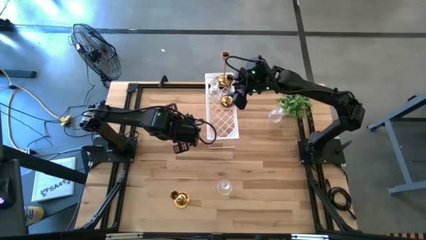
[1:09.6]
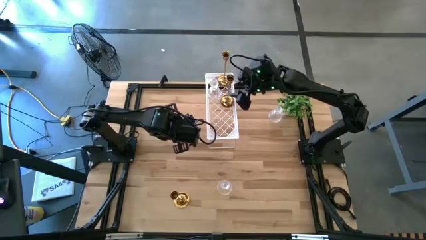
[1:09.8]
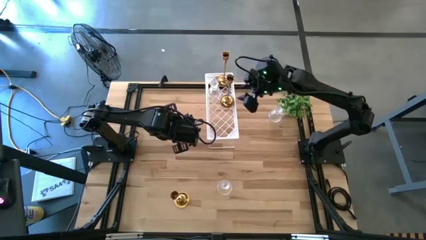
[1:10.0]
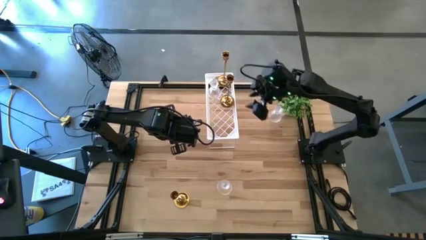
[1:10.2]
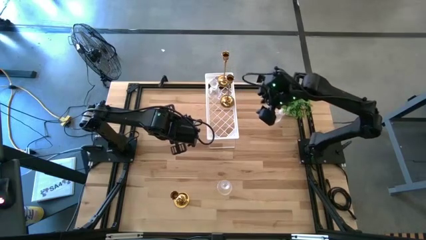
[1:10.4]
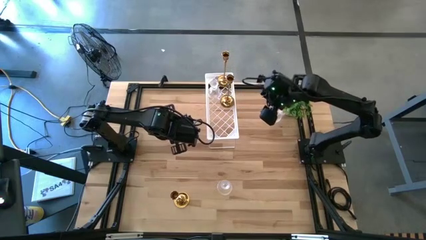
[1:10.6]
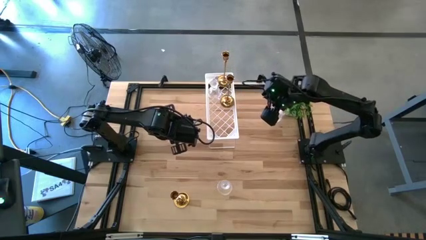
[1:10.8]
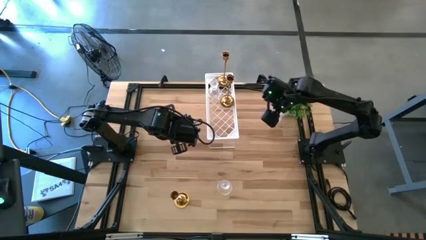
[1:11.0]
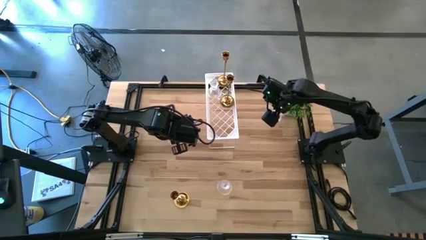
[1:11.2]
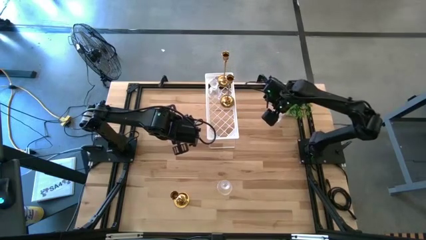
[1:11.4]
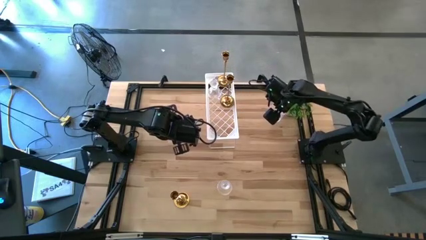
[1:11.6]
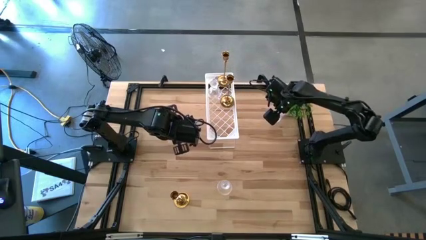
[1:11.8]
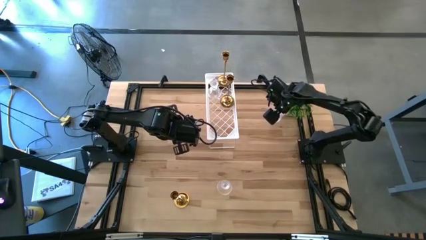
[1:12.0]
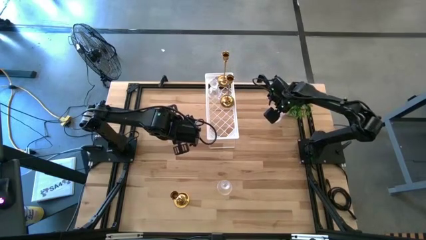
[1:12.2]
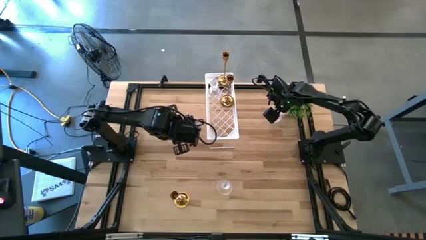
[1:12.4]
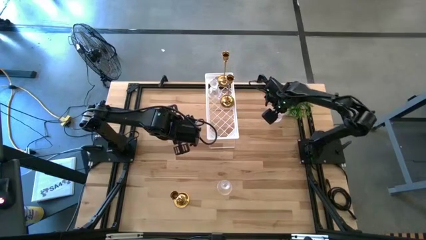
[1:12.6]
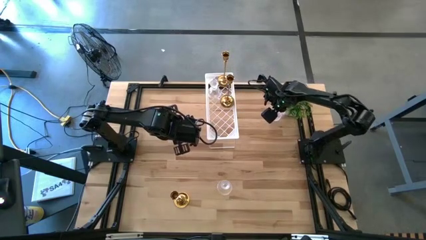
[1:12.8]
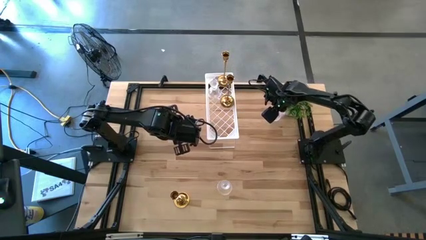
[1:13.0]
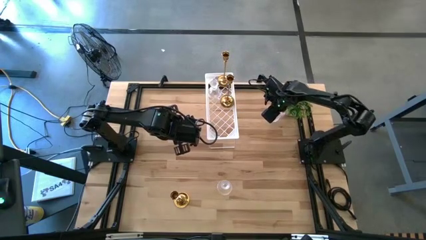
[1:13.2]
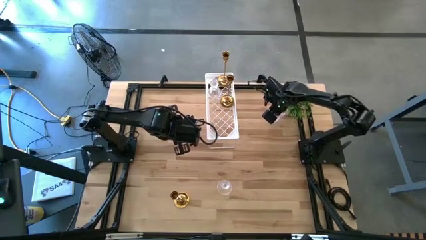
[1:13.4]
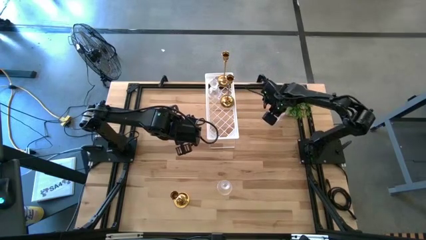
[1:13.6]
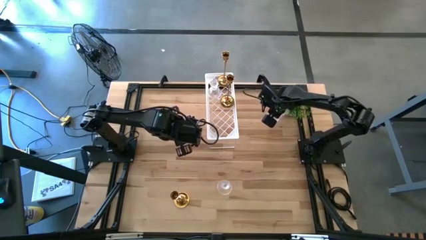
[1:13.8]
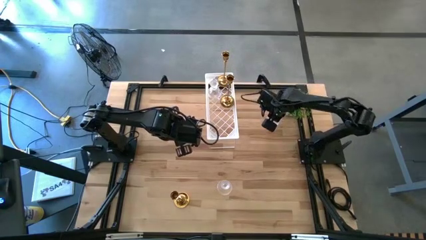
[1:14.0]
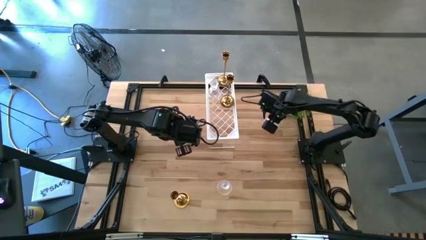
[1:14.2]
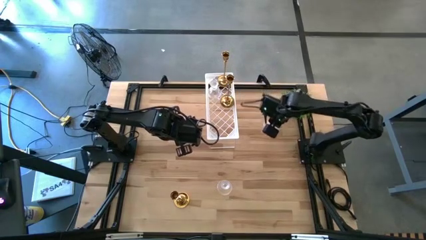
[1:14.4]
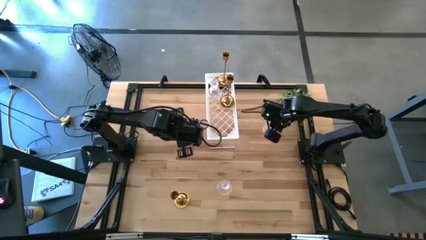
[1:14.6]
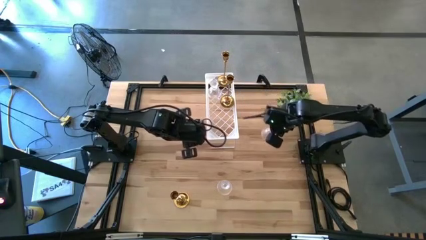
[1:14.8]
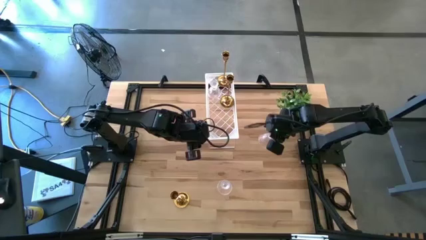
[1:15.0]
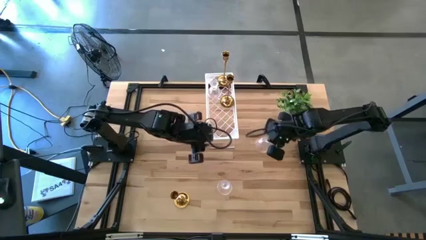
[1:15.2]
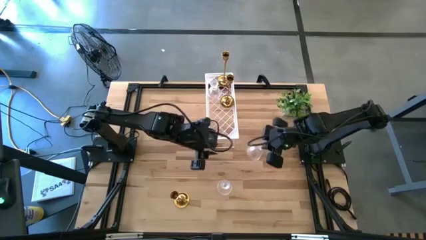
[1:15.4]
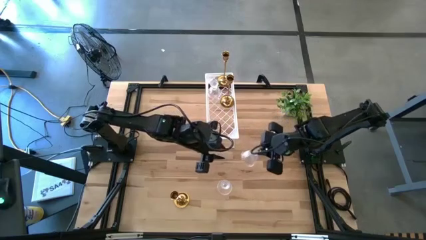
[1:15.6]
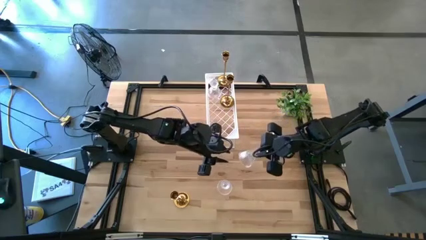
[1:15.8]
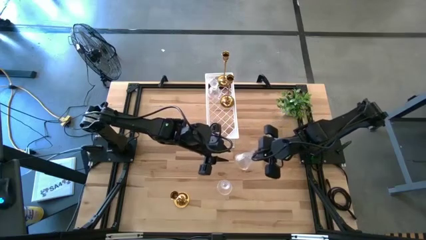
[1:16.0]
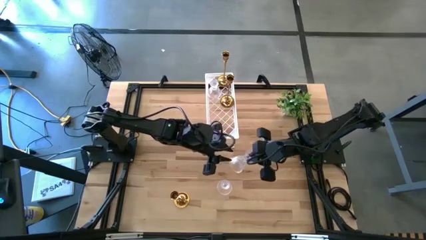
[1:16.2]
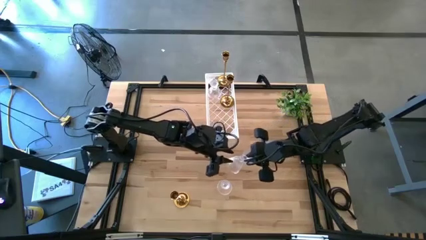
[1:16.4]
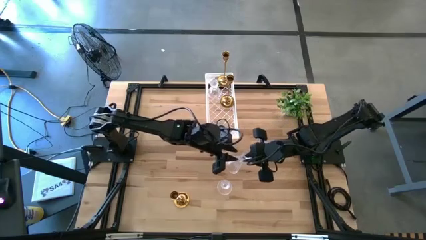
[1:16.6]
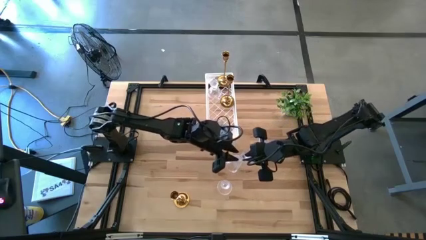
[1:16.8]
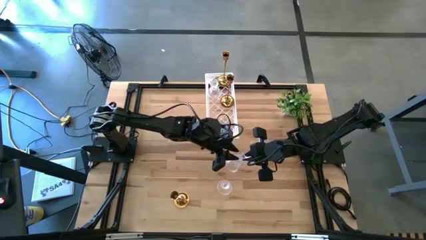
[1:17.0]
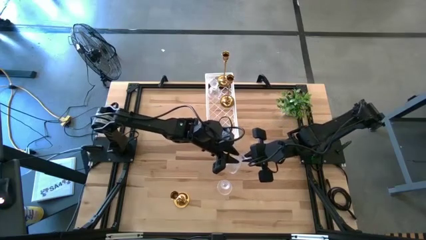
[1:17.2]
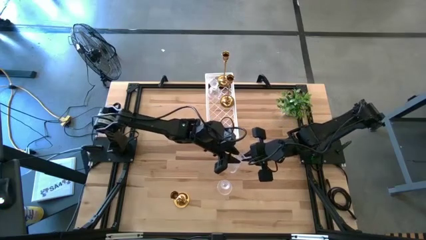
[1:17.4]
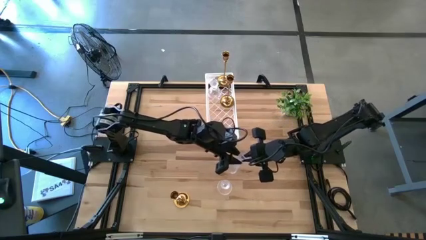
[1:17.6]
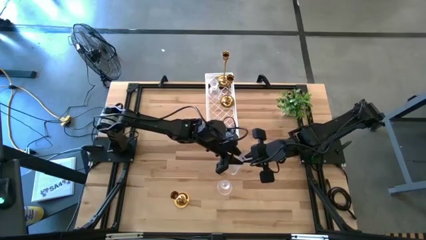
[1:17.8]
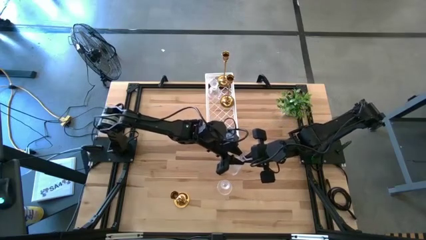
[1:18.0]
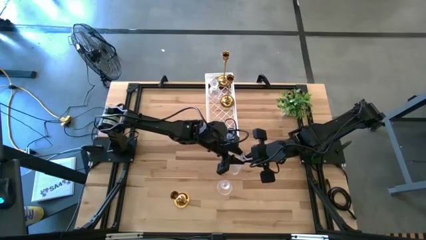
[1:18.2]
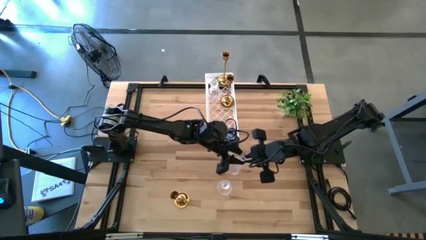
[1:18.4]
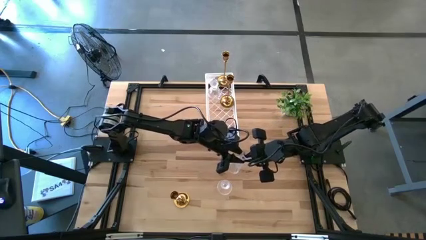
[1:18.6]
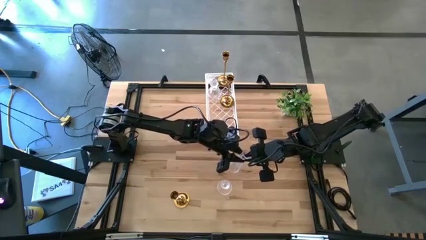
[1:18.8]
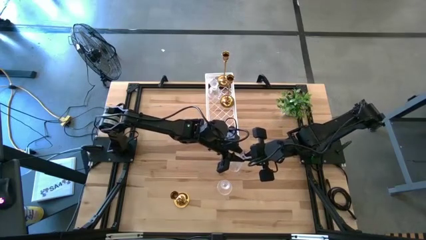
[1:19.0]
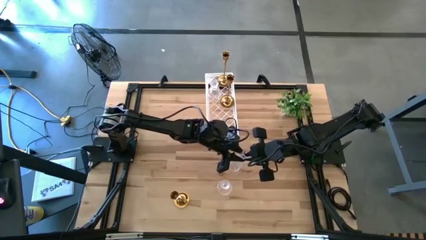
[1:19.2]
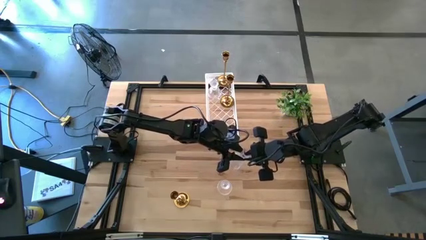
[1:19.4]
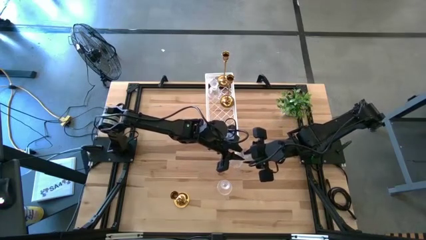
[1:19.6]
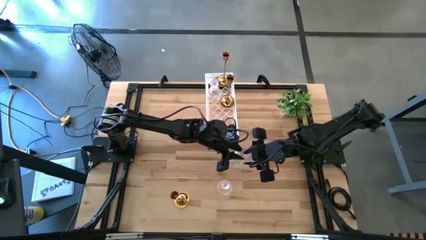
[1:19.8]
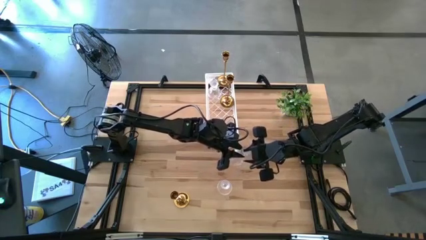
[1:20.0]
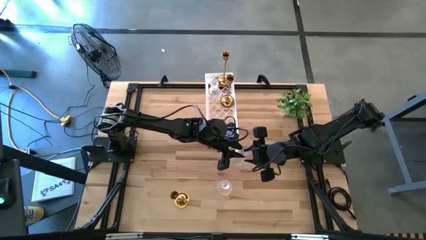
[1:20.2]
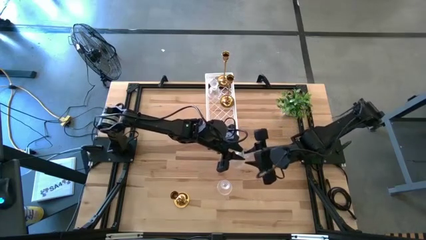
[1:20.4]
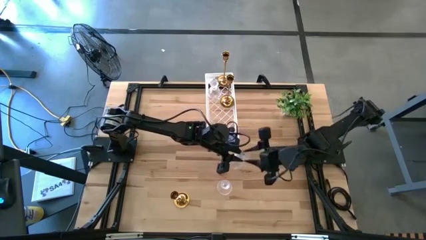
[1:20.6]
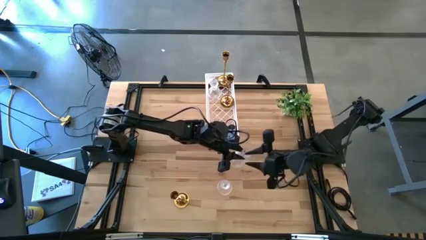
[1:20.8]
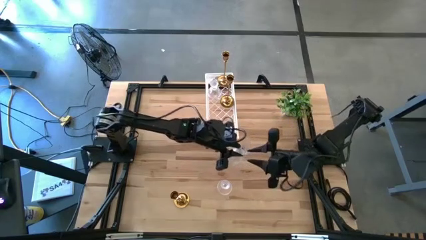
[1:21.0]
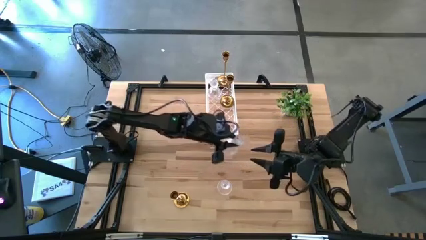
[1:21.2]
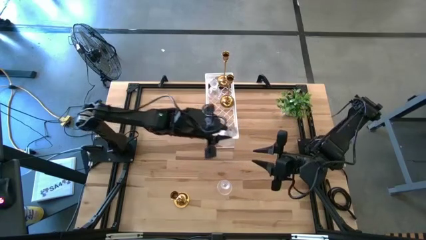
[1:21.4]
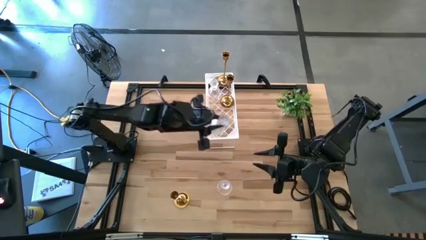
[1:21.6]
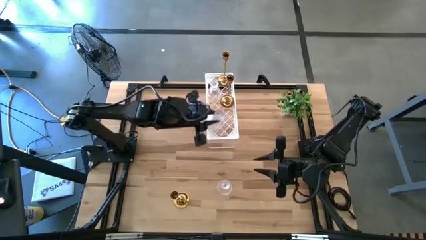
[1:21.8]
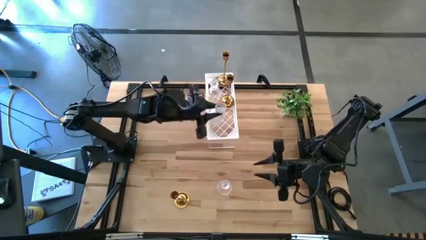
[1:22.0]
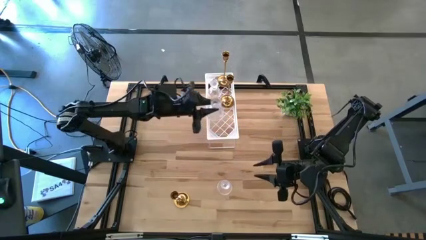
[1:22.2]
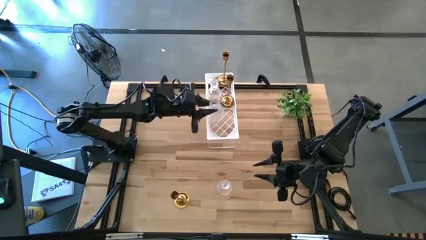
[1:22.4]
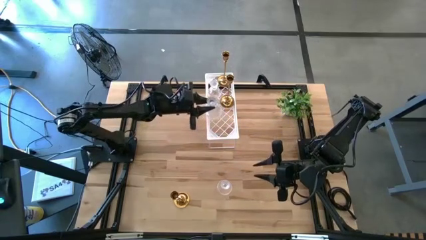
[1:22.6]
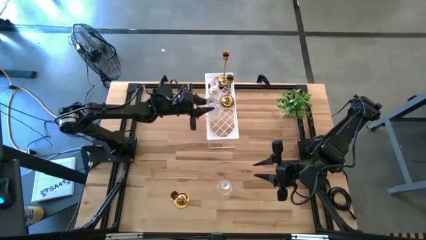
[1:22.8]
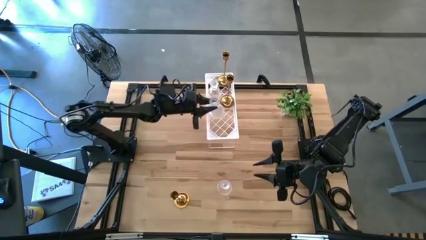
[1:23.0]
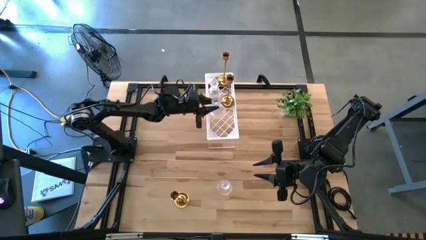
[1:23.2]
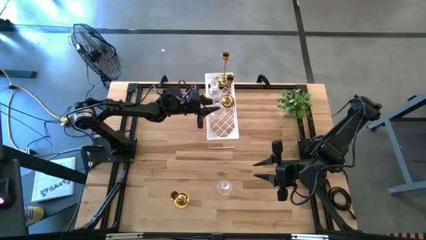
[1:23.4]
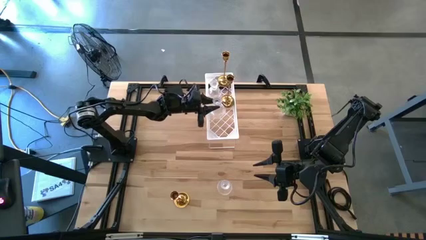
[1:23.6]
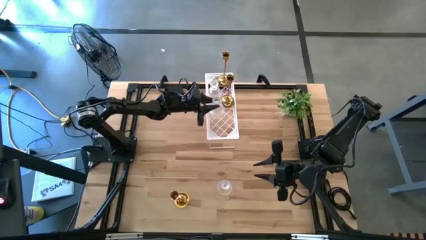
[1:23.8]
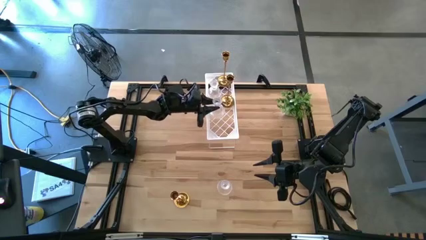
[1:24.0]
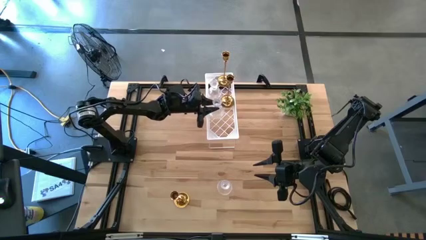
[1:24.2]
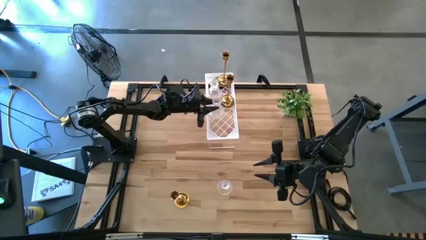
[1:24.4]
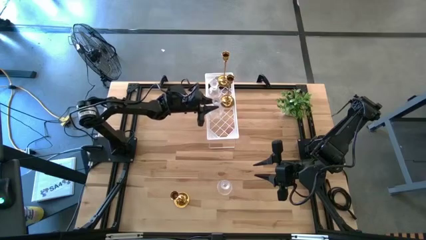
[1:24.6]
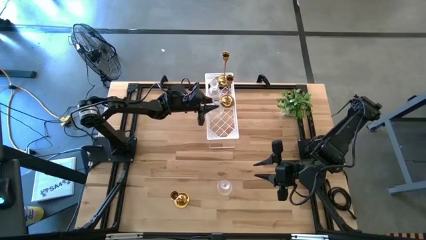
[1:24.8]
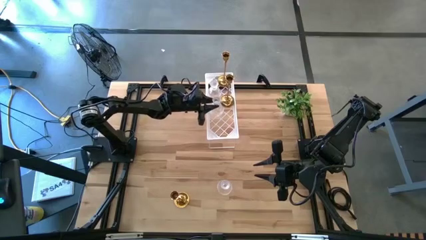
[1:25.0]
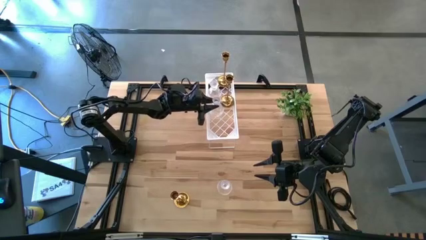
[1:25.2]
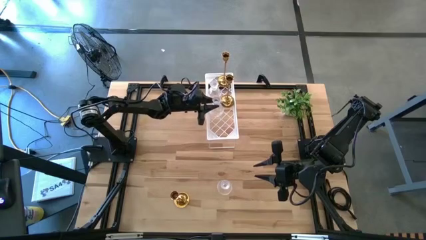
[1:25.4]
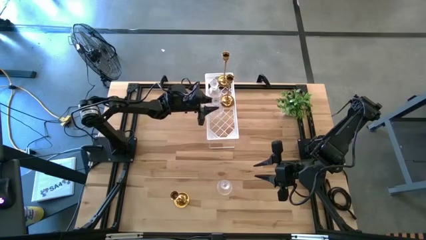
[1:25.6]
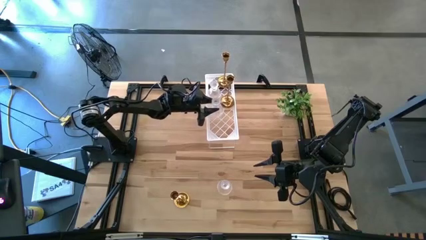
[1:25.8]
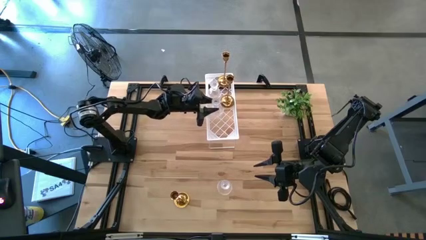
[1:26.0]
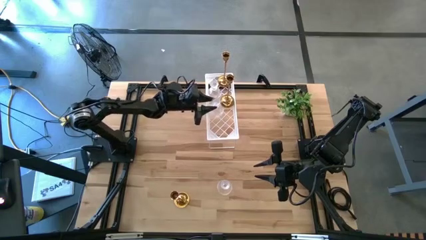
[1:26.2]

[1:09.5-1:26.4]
Task: Pick & Place candle stick holders
Put the top transparent candle holder on the shelf aligned with the other transparent candle holder
